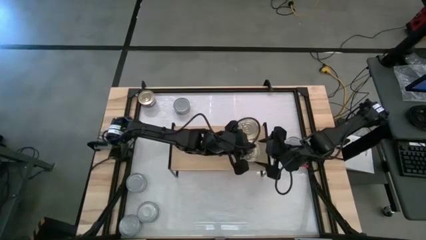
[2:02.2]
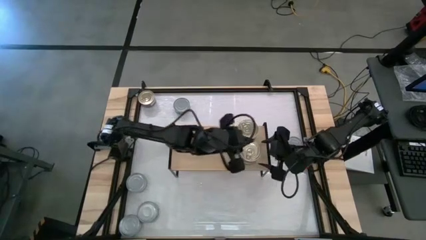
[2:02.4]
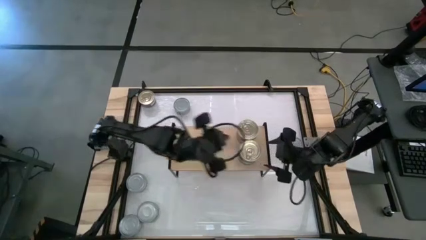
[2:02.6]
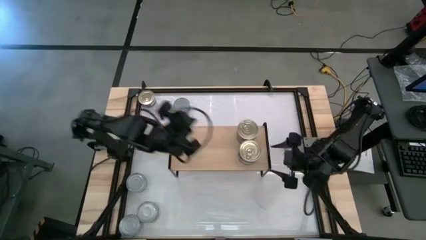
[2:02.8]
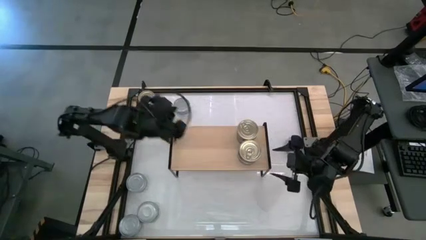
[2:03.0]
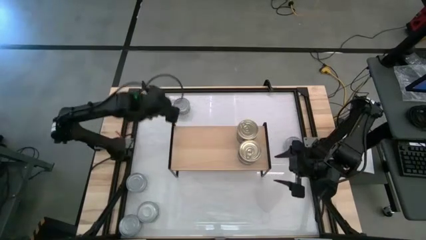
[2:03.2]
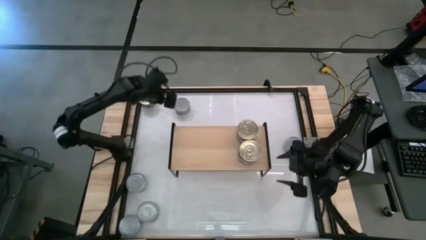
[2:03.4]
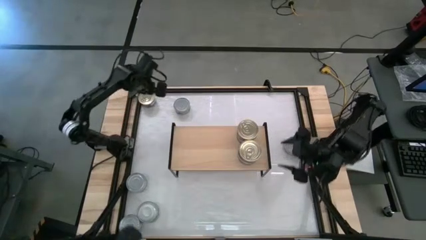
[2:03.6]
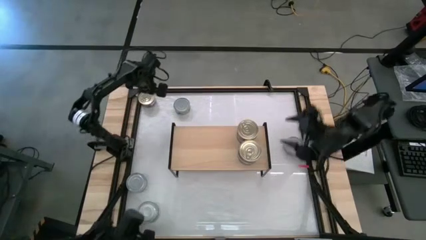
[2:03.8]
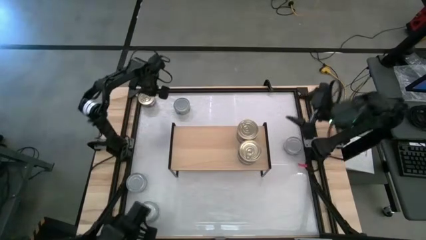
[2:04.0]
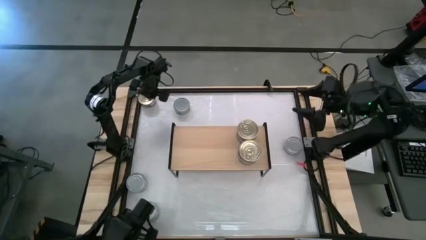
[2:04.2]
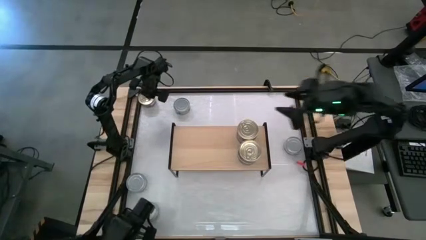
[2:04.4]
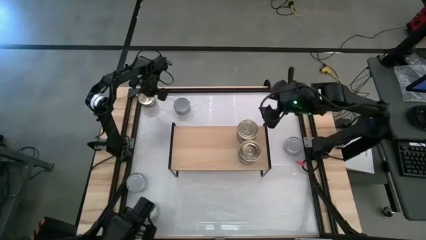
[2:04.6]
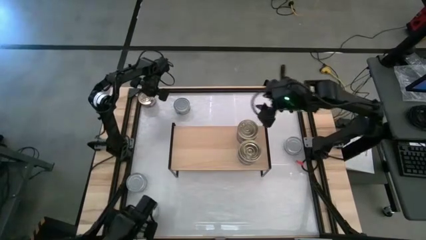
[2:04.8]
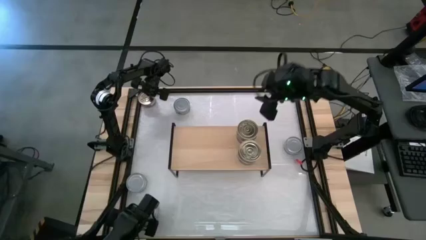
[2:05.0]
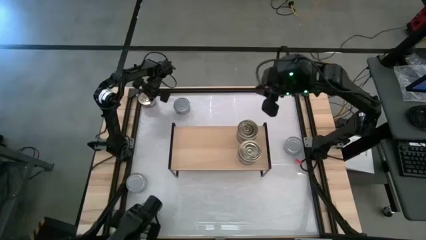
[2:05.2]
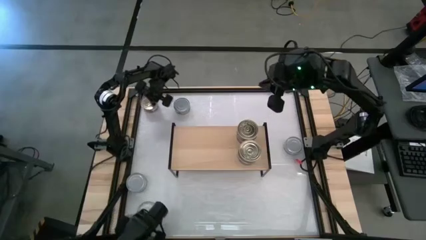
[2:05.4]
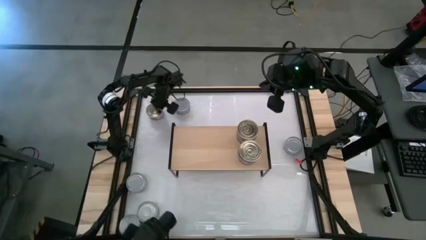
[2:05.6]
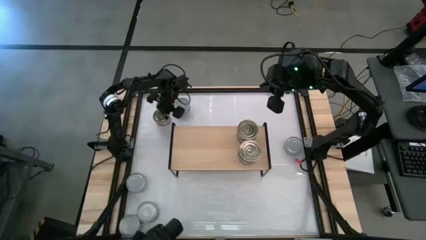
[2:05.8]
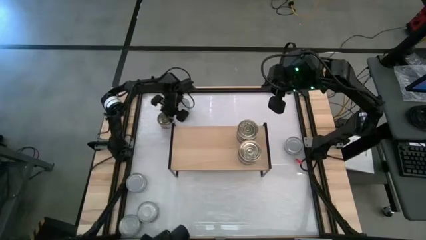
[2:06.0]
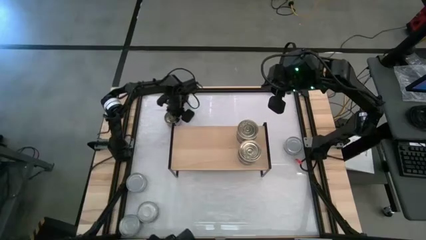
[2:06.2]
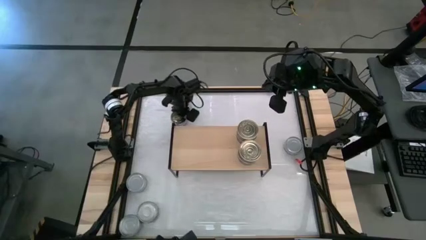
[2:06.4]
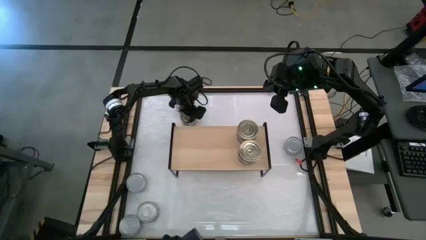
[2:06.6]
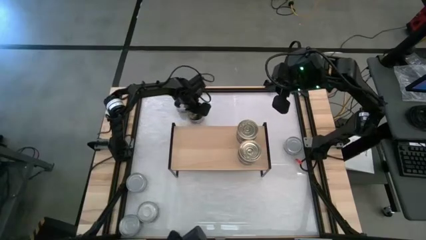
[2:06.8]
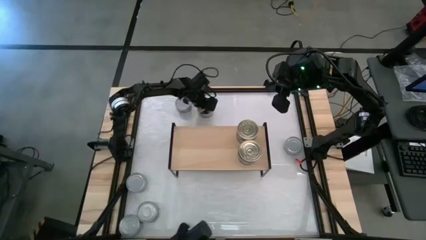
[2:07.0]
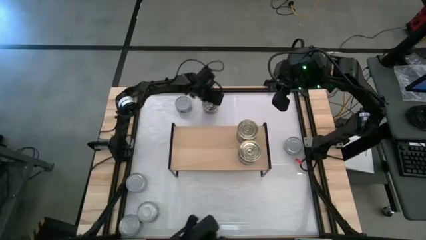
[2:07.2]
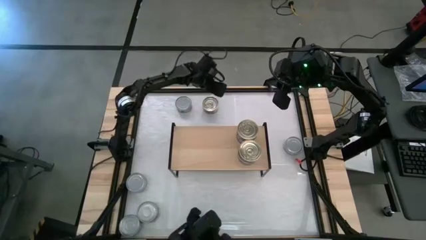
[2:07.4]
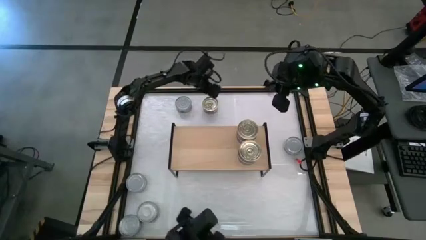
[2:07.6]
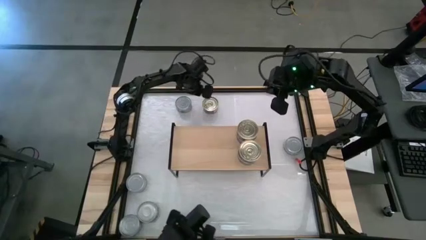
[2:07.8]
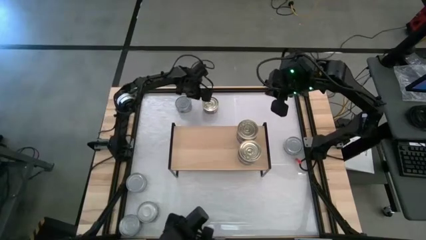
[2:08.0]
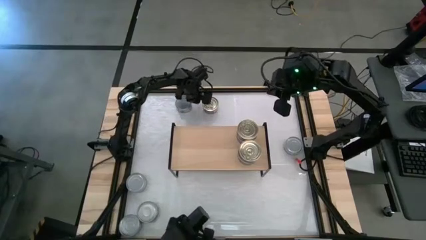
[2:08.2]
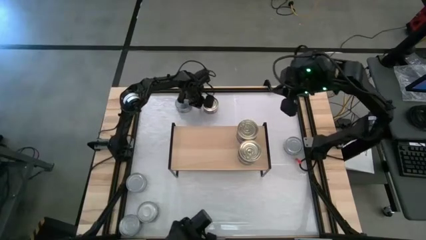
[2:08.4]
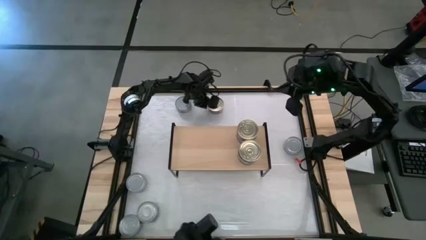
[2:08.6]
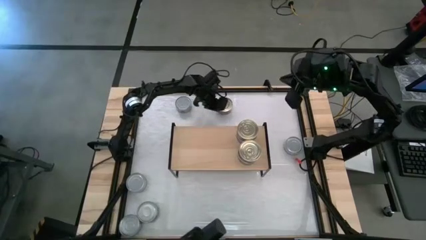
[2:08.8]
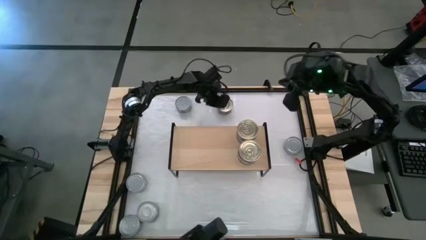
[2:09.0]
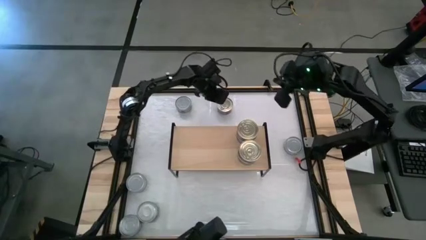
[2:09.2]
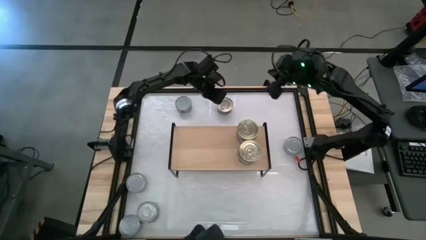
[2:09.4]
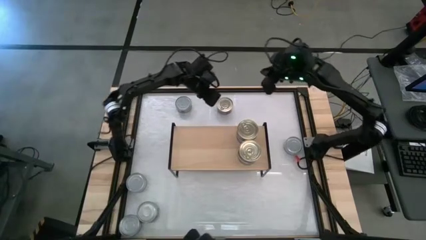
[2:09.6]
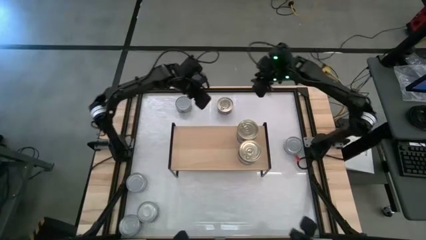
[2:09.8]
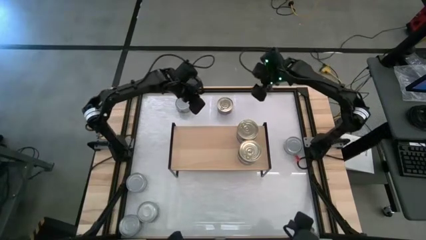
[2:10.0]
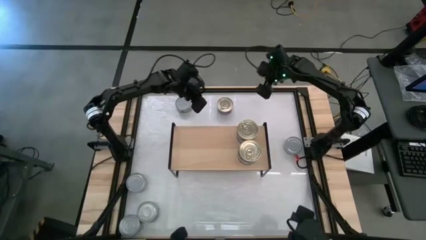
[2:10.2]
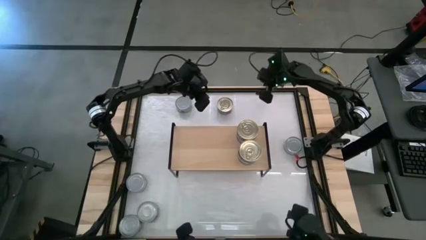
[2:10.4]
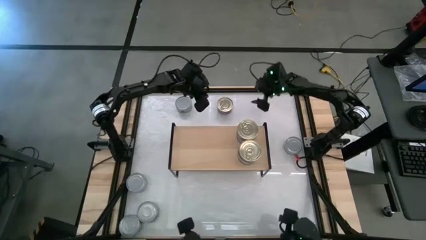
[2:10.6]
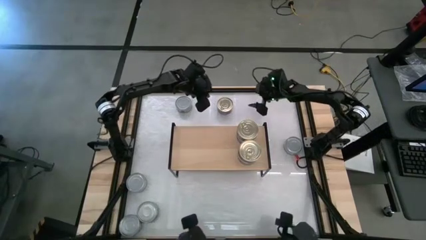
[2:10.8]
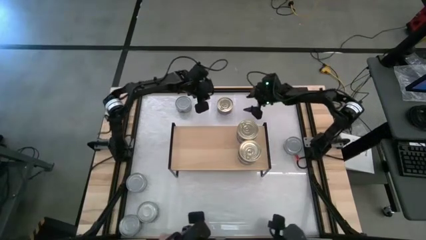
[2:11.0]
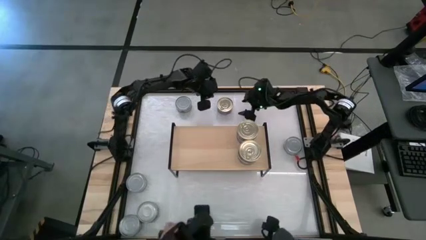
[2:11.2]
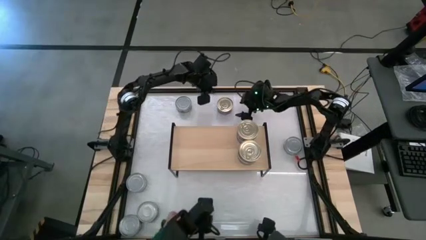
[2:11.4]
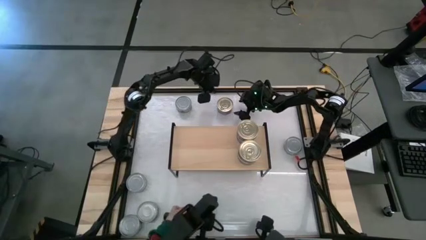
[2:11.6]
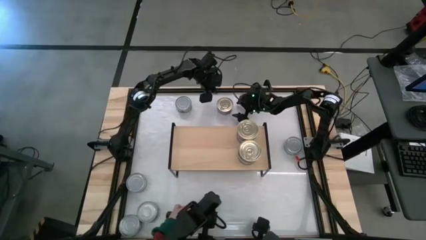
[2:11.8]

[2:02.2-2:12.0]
Task: Stack canned seafood by type on shelf
Stack the blue-pink tuna can on top of the other blue-pink tuna can on the shelf
